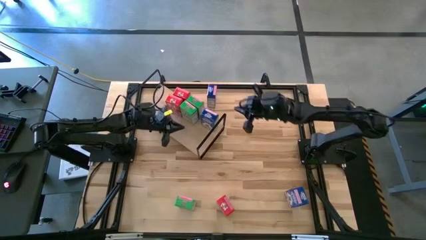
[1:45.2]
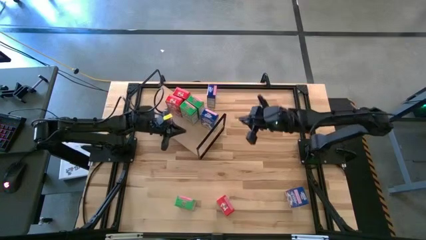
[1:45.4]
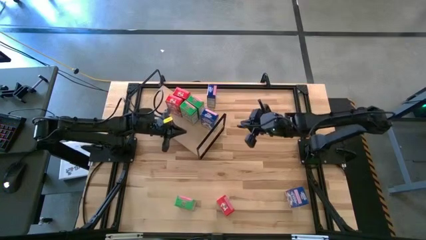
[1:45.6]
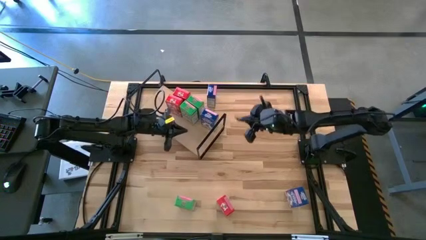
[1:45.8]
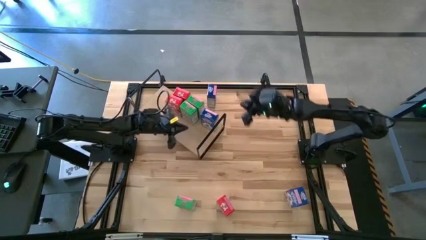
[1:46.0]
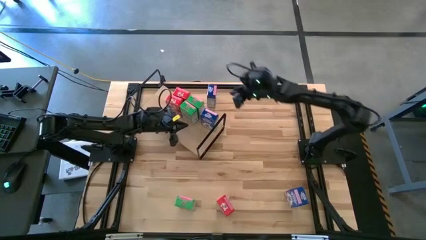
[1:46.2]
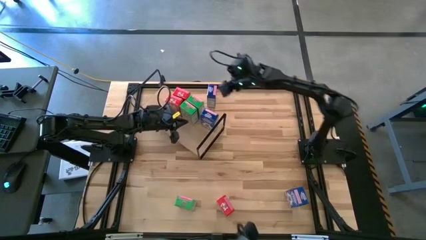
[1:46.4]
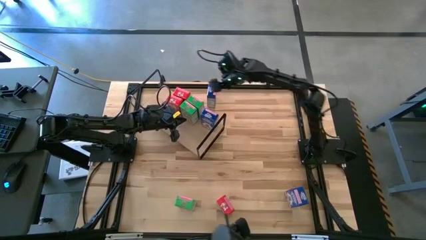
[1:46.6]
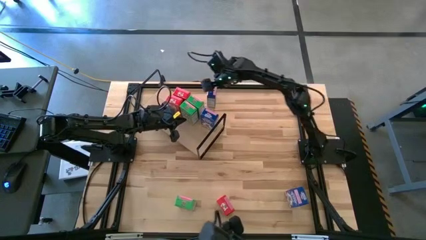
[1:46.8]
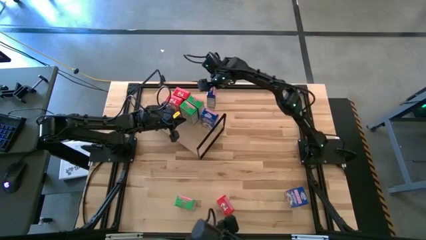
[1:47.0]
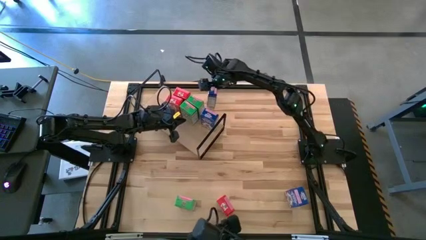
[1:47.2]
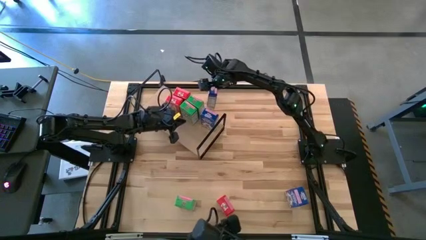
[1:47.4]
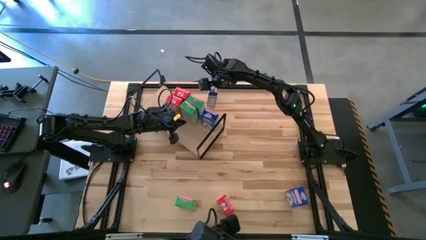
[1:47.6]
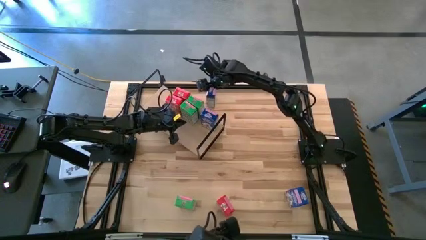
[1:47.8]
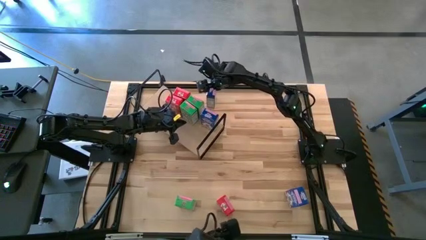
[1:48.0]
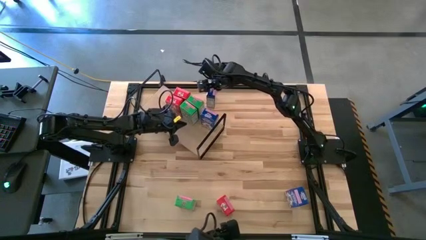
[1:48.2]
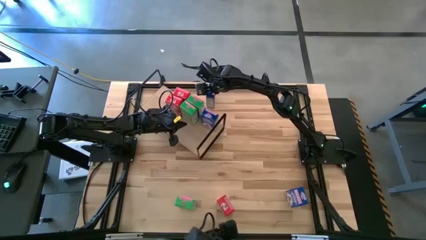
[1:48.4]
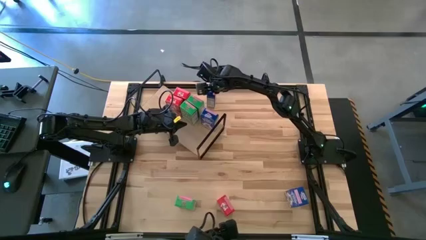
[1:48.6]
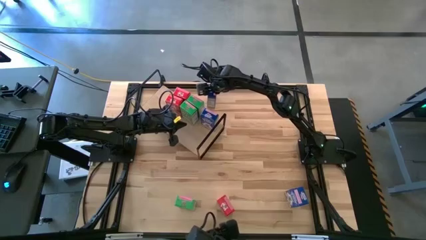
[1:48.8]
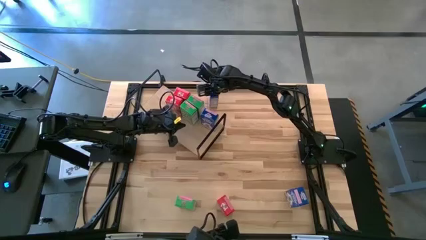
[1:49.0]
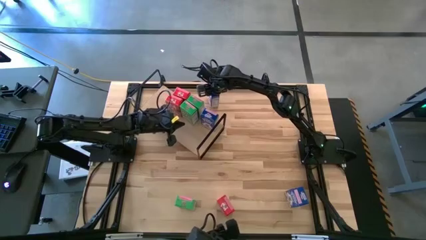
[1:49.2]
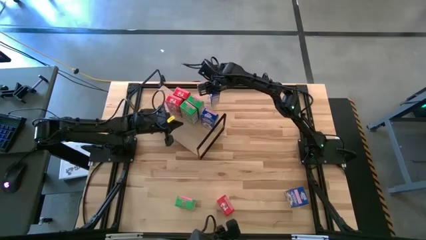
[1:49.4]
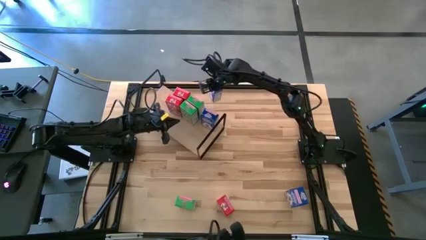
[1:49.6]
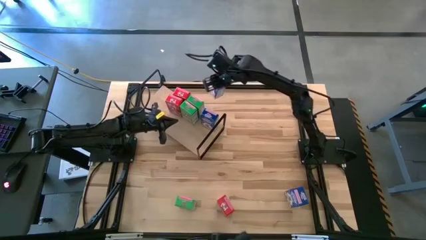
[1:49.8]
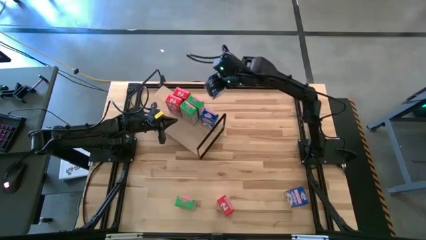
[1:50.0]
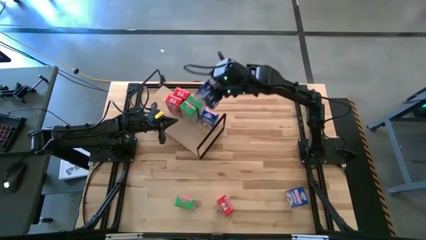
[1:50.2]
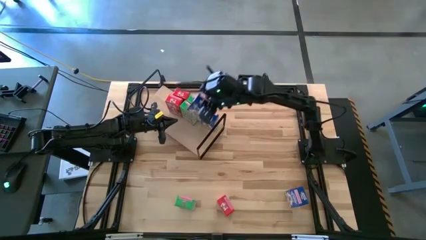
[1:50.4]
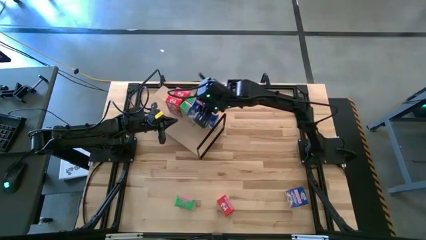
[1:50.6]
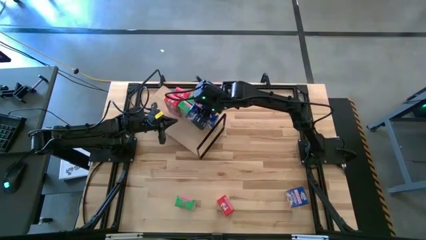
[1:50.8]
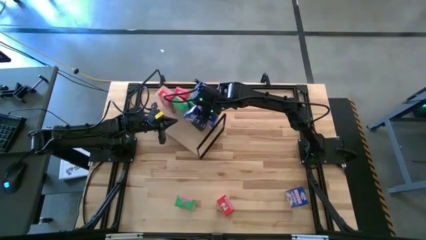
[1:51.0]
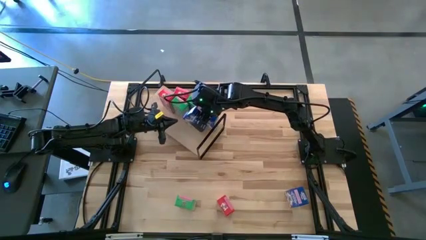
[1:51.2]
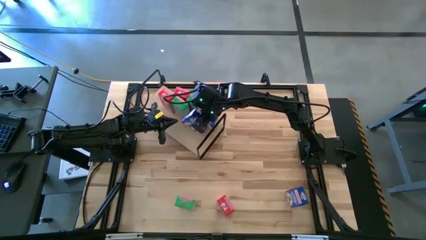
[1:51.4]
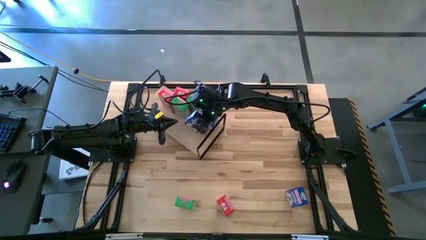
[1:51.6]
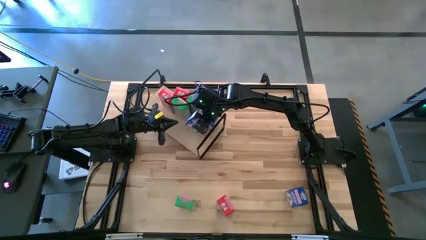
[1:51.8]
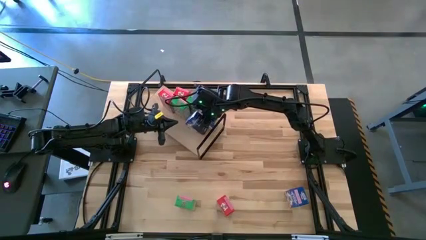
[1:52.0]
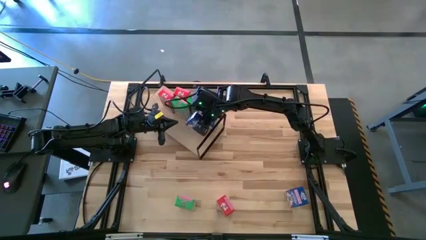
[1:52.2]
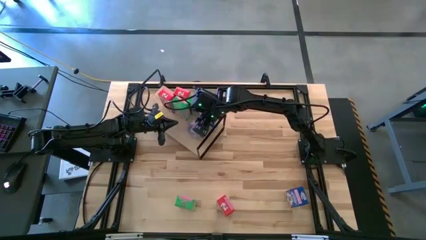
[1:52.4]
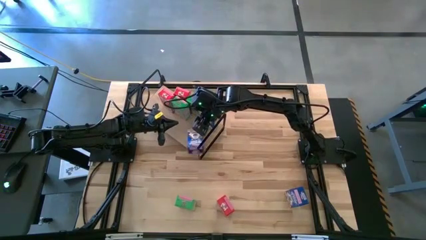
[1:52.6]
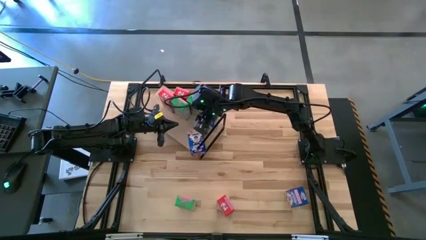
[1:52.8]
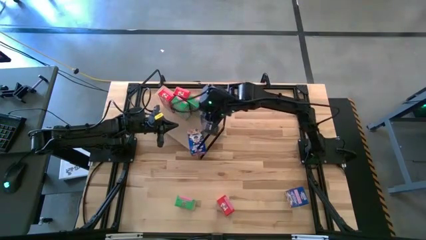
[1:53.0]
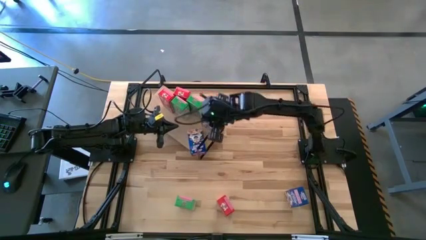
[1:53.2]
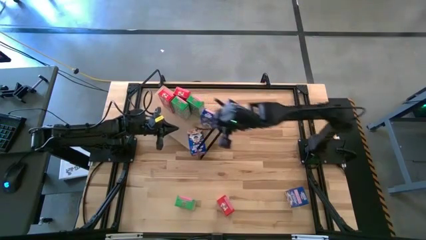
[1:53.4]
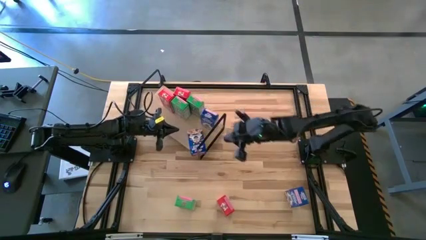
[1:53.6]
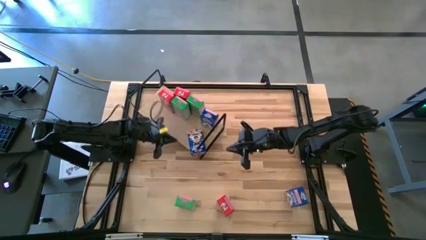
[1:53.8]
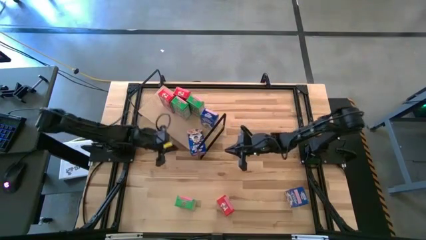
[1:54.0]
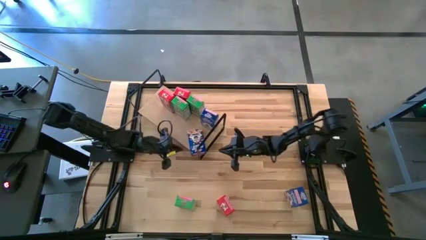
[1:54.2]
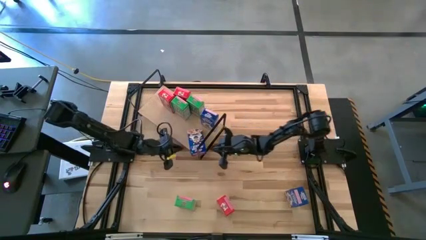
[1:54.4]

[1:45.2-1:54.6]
Task: Stack cereal on shelf
Put the top blue cereal on the shelf

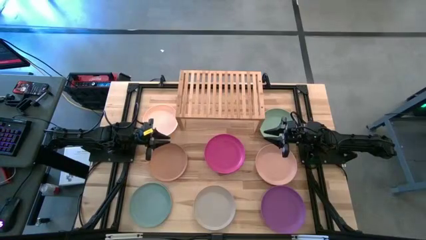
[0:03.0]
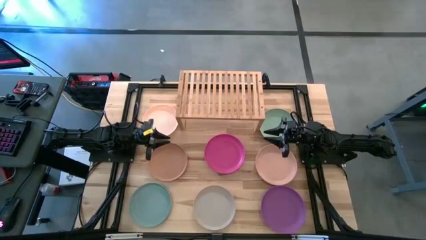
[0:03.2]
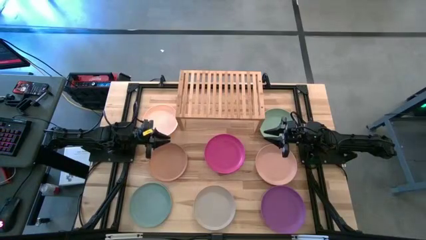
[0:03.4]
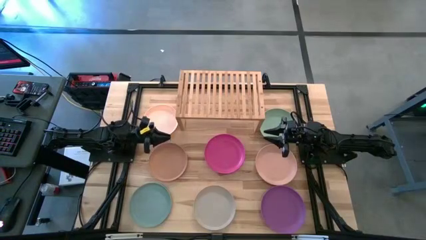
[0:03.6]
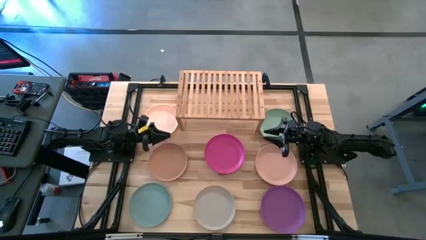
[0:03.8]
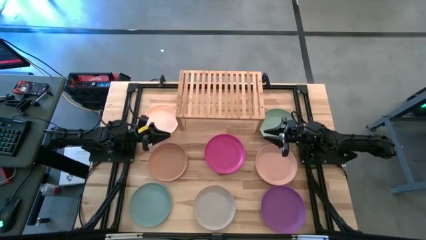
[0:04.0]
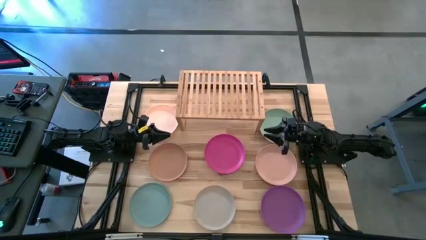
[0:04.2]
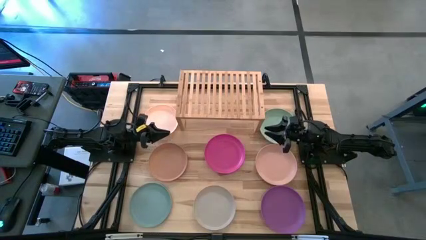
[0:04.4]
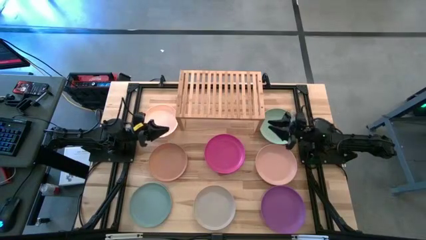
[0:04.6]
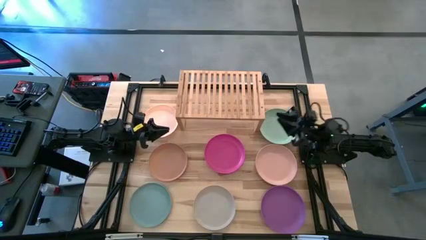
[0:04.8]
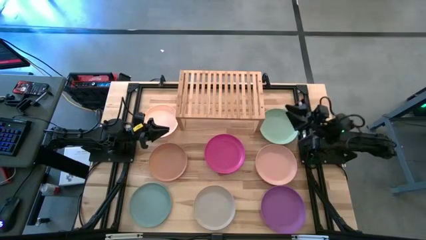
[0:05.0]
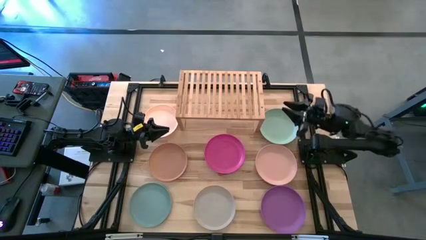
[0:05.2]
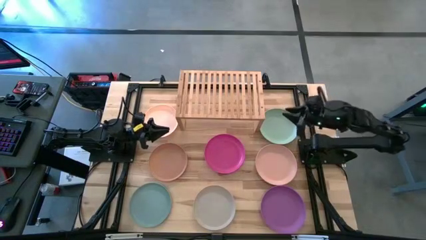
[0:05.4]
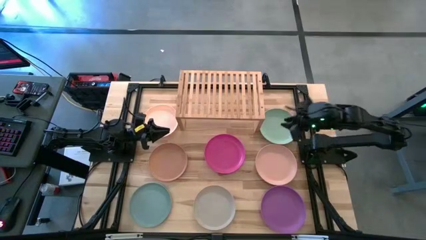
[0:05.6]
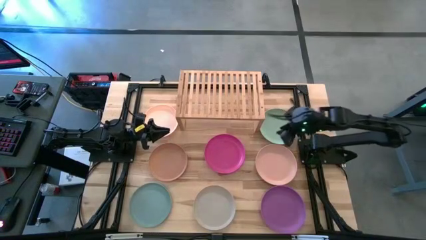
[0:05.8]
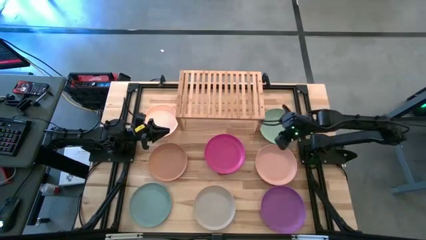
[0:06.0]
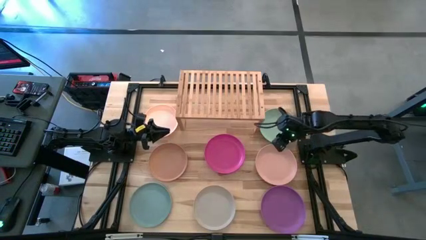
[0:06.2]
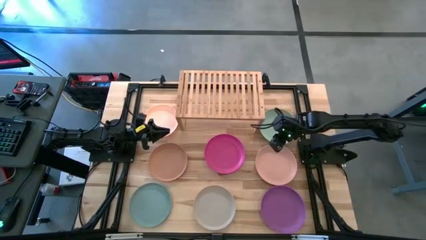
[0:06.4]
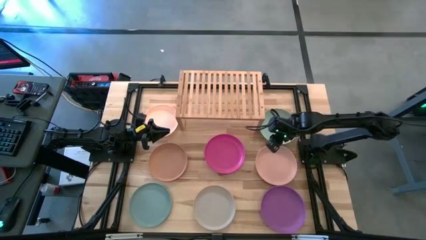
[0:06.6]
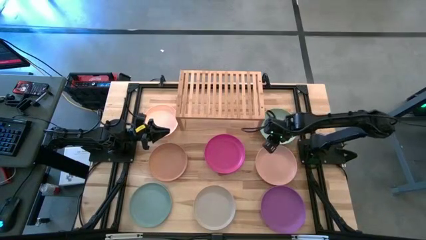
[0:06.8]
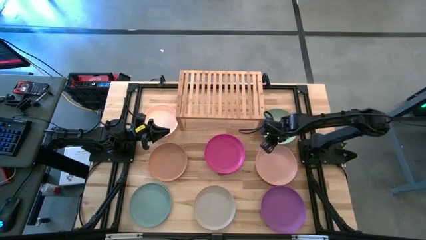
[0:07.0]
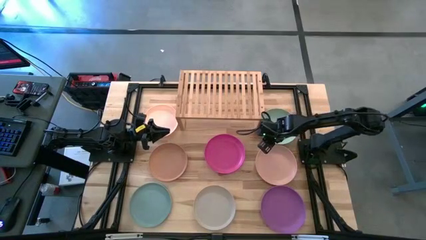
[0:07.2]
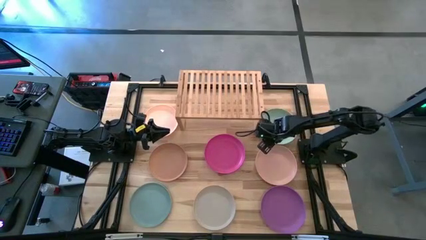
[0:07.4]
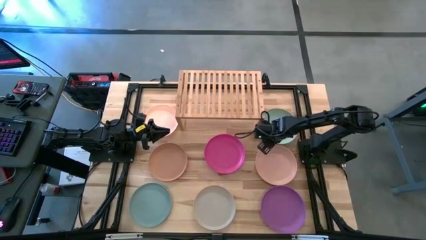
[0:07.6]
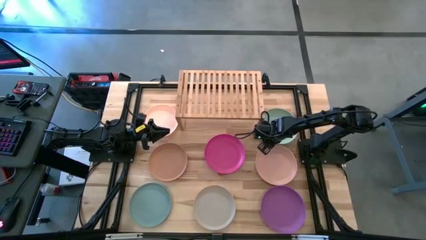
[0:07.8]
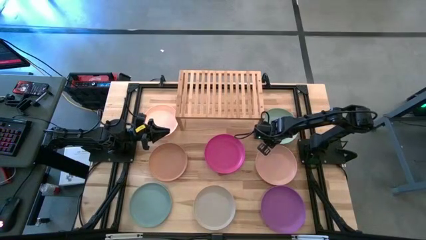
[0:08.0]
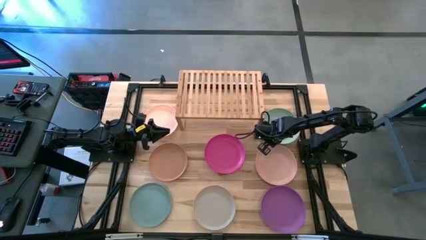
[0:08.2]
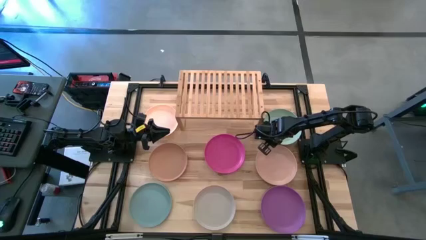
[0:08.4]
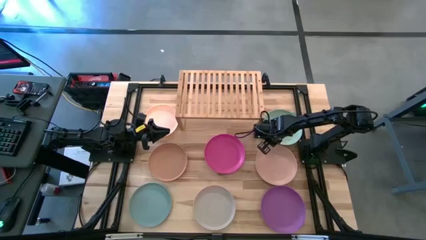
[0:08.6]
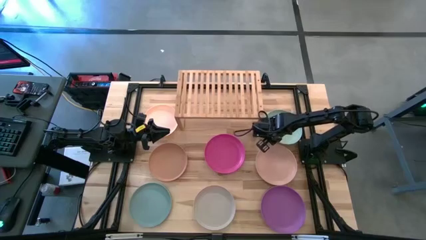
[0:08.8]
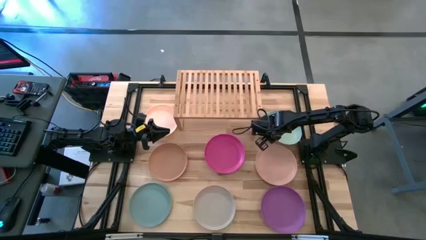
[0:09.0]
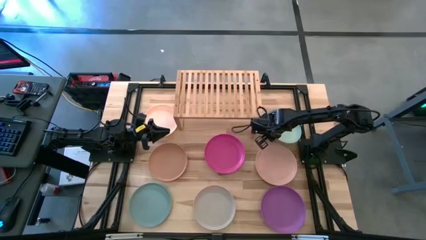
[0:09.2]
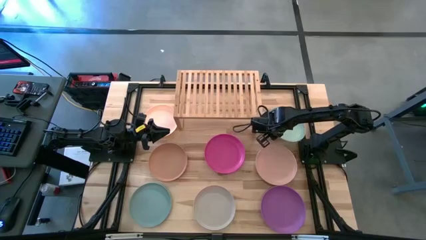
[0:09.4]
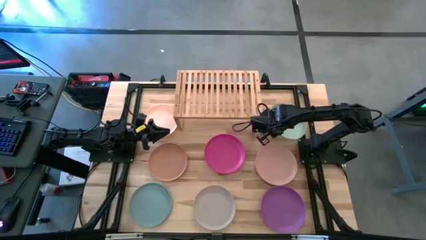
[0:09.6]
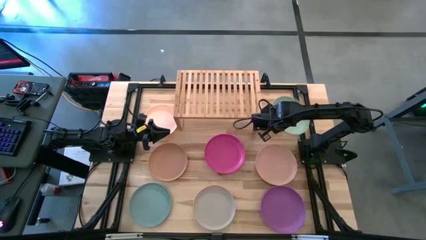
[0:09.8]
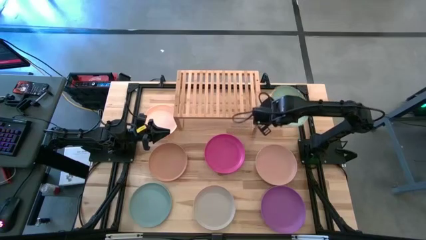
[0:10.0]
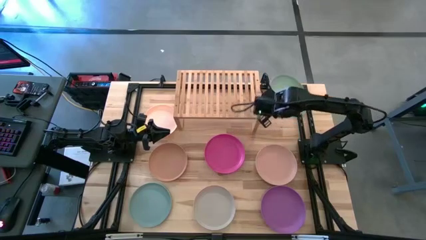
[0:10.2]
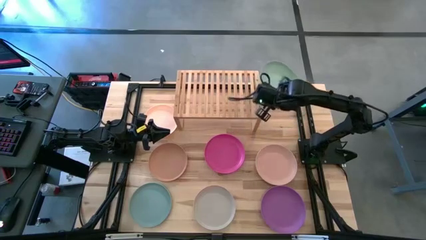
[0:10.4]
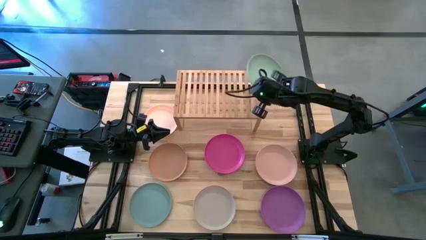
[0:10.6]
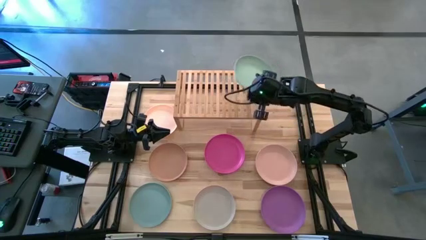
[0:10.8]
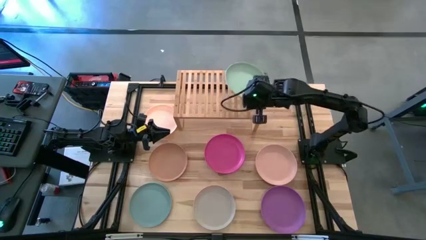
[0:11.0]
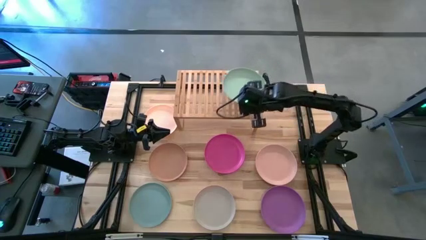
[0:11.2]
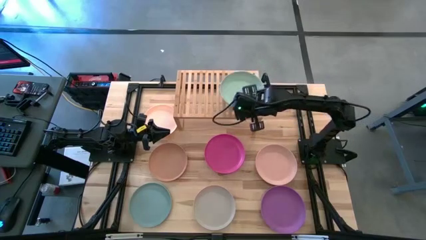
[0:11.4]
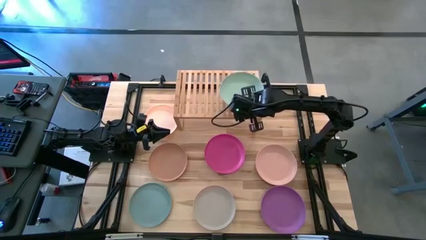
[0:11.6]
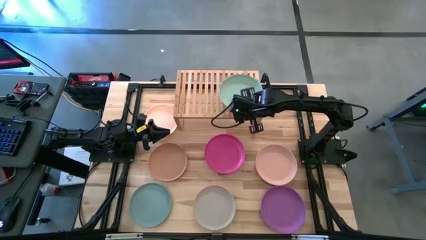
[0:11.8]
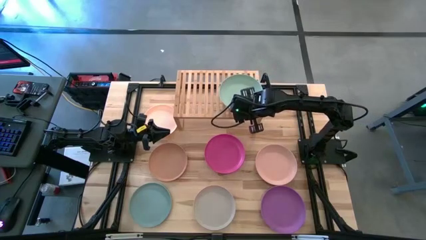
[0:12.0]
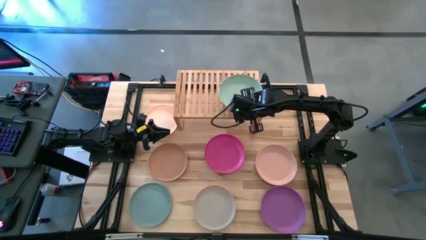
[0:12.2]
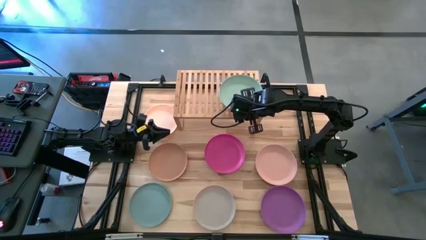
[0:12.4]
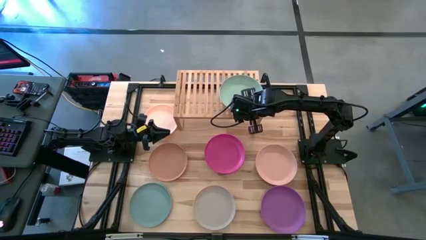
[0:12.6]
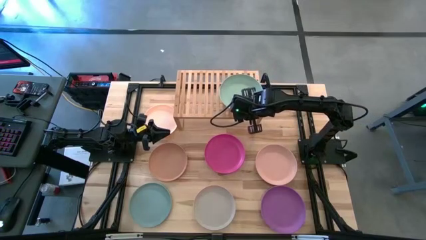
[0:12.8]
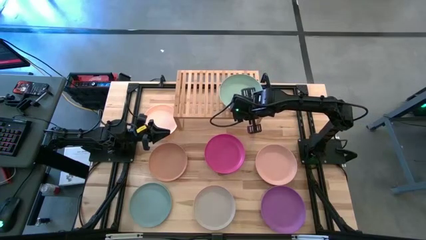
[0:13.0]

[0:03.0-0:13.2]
Task: Place and stack plates onto a shelf
Put the green plate on the shelf
